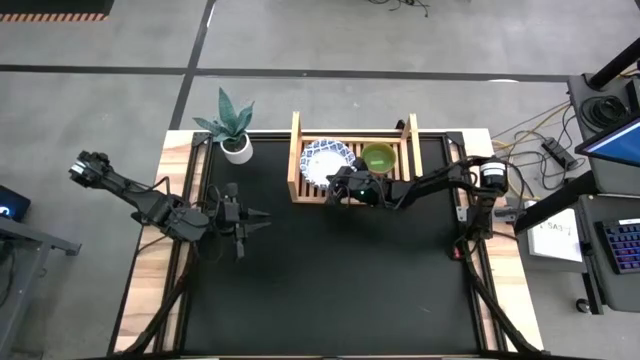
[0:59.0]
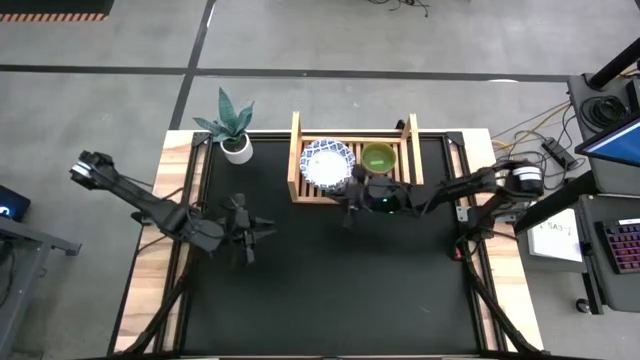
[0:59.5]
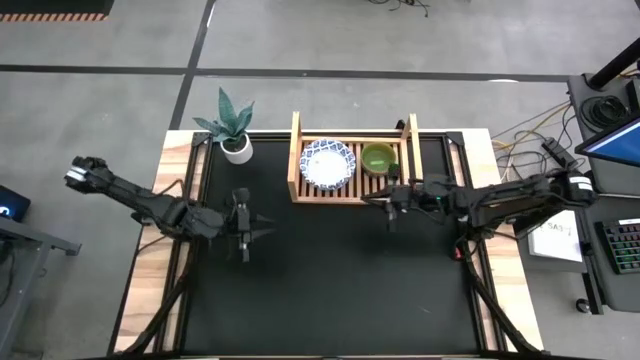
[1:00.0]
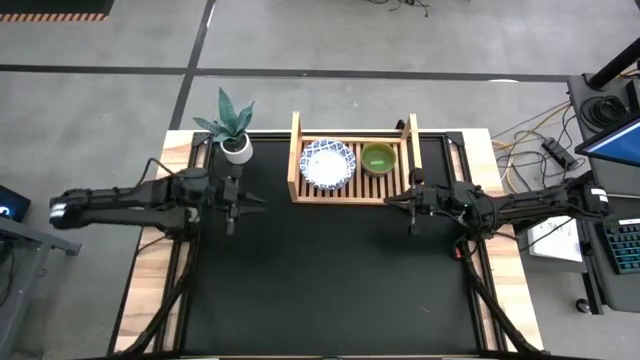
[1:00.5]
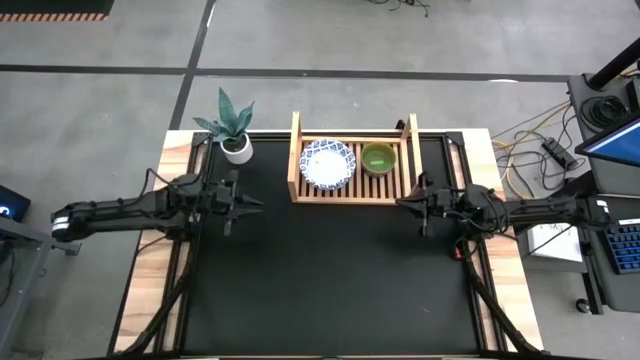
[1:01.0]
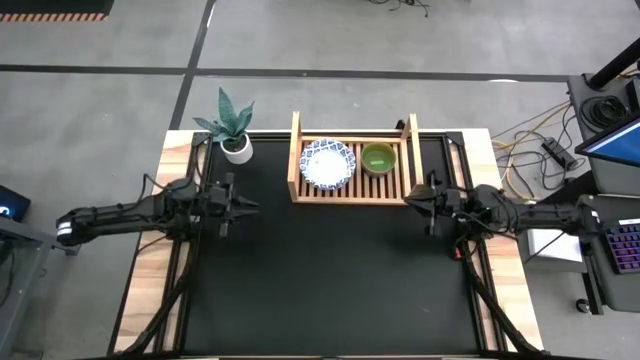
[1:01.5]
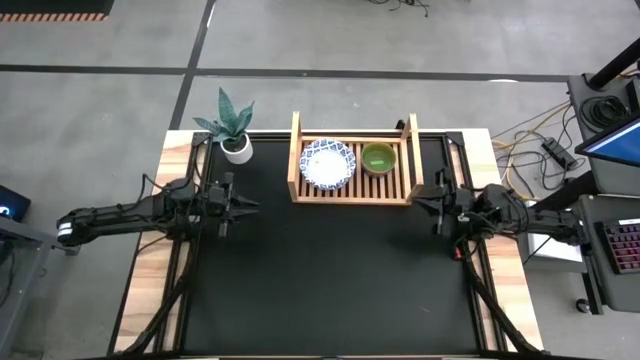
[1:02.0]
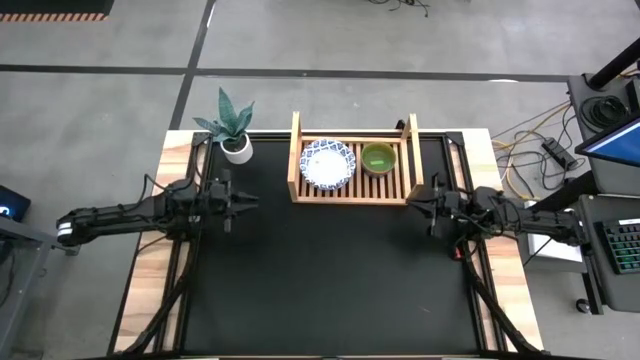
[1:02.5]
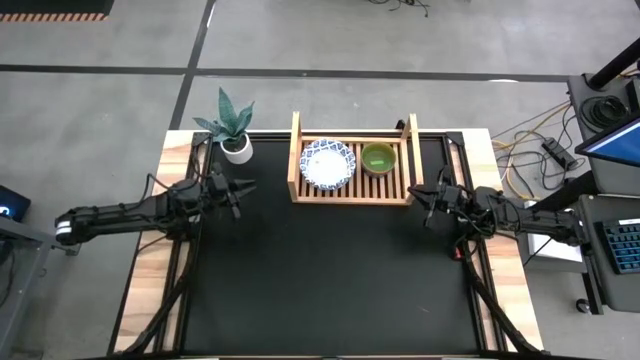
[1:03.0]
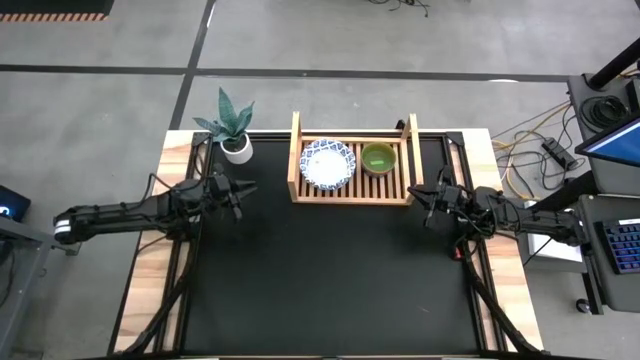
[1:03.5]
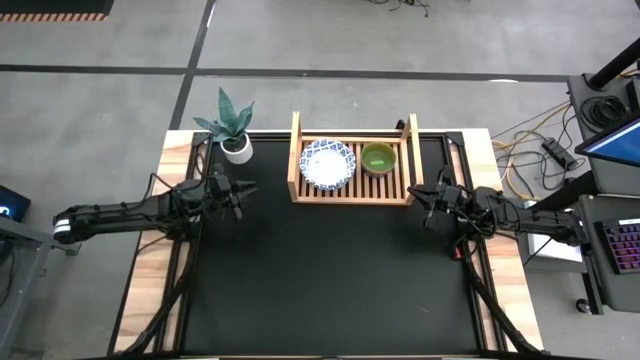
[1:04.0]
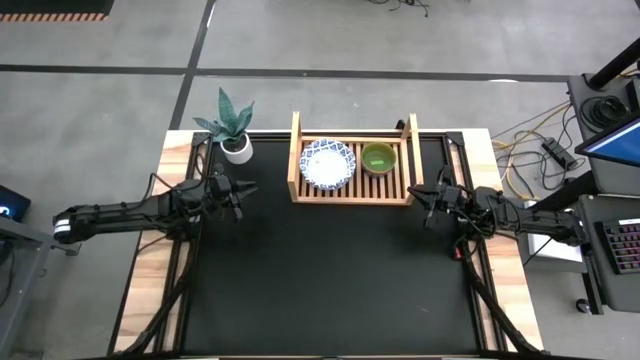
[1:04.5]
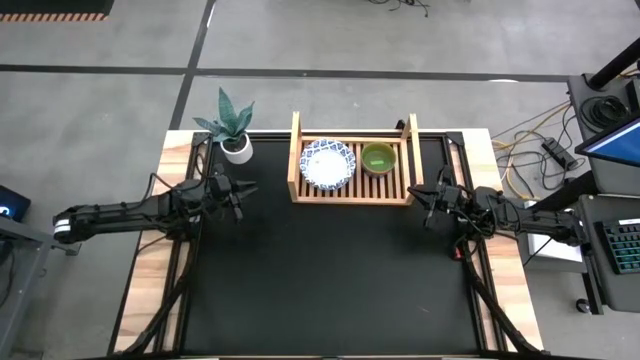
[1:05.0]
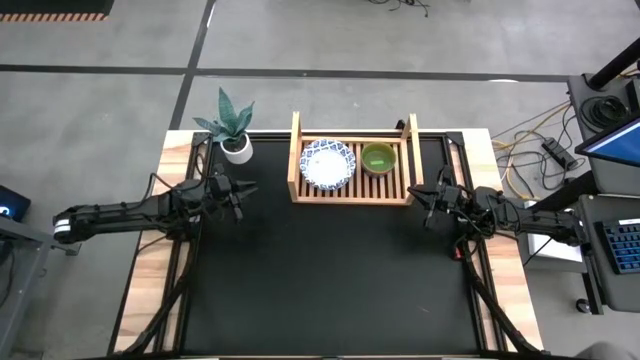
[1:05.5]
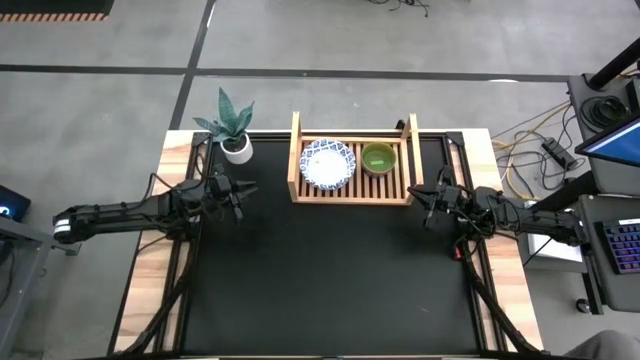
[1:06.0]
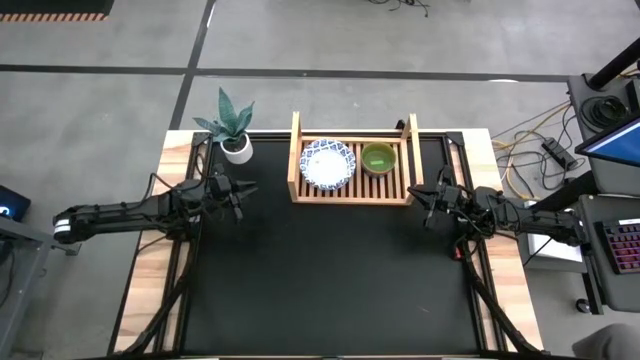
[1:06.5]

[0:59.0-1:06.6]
Task: Place and stack bowls onto a shelf
Return to Home Position

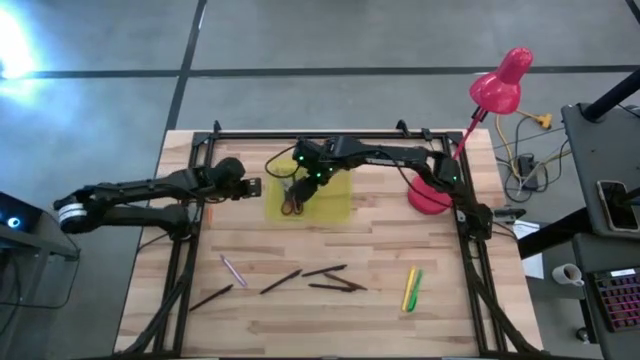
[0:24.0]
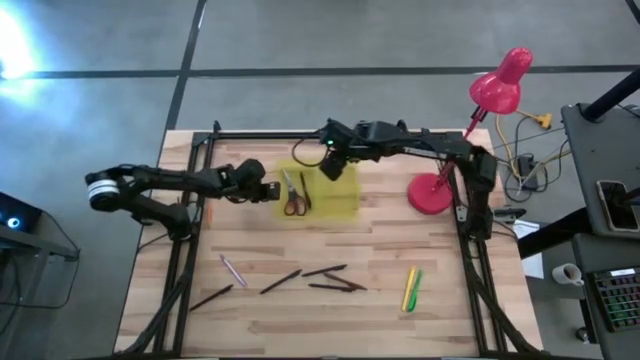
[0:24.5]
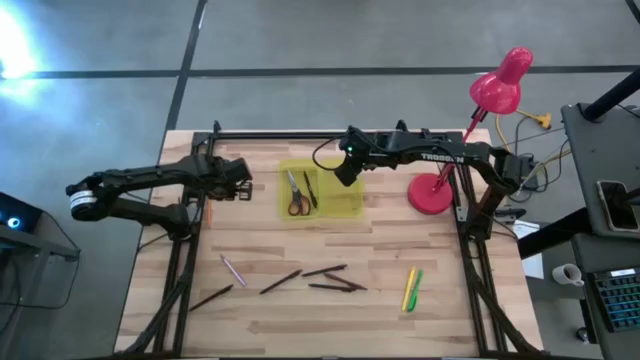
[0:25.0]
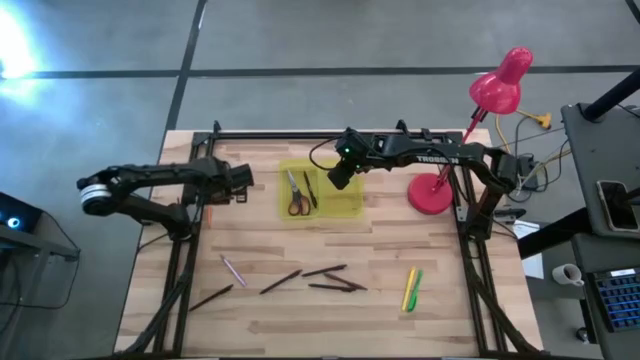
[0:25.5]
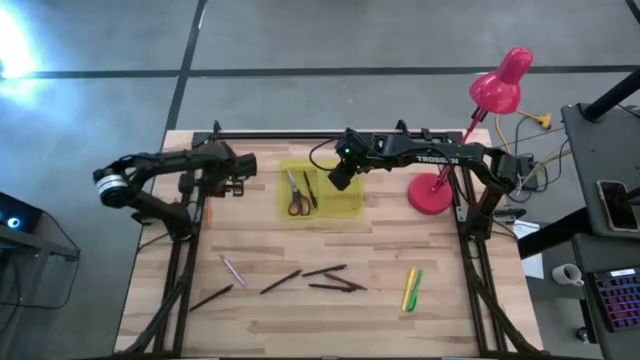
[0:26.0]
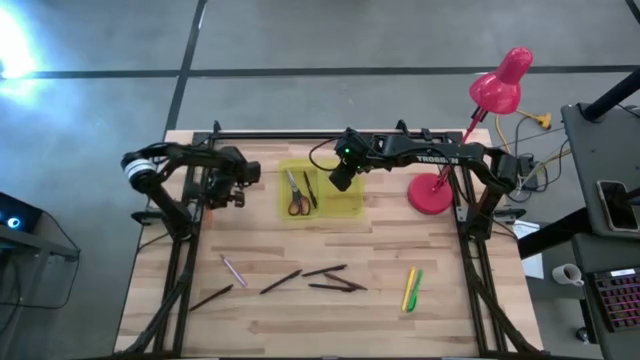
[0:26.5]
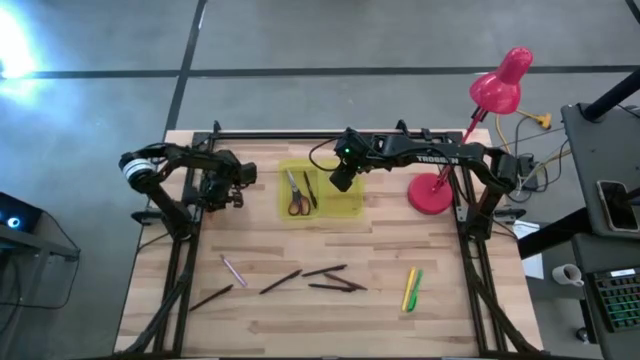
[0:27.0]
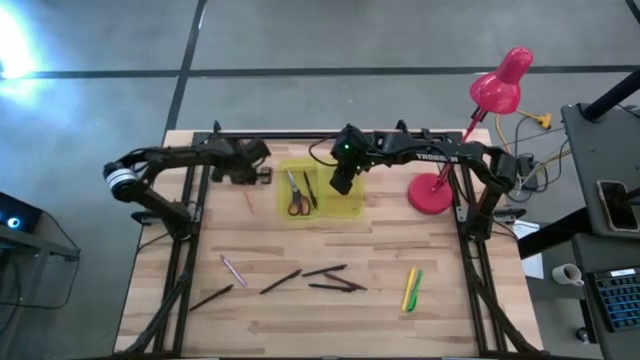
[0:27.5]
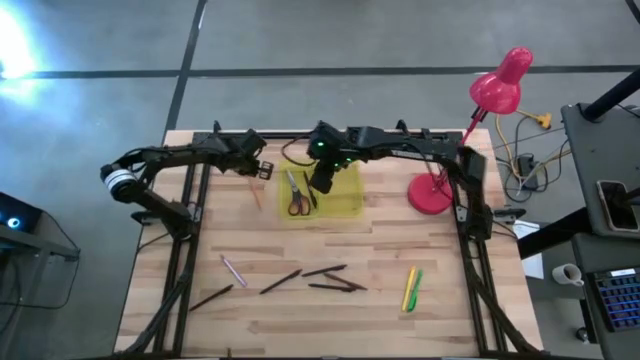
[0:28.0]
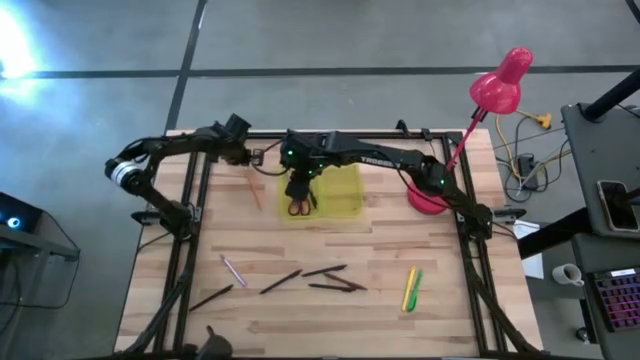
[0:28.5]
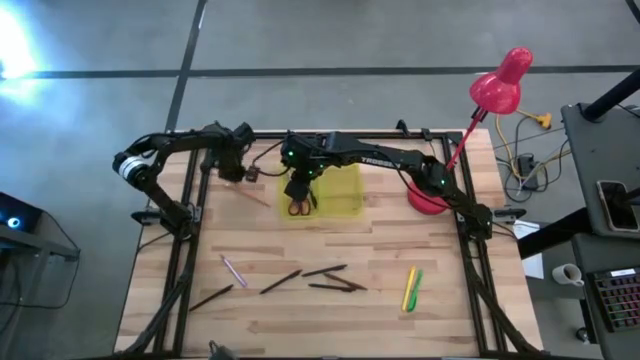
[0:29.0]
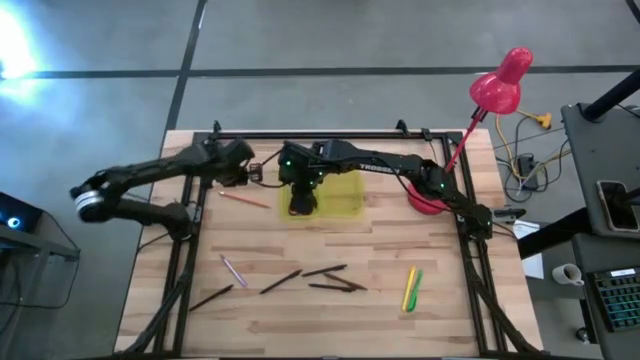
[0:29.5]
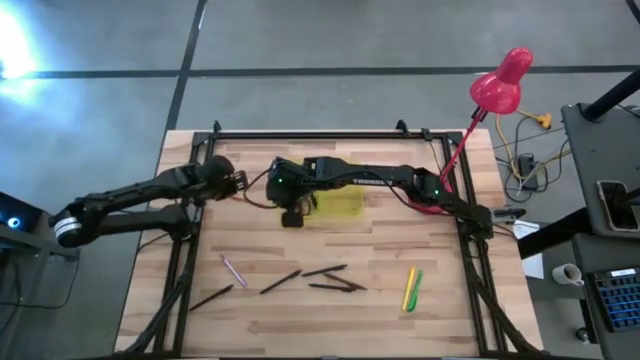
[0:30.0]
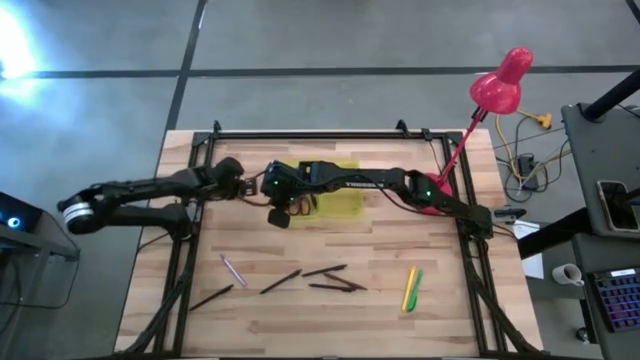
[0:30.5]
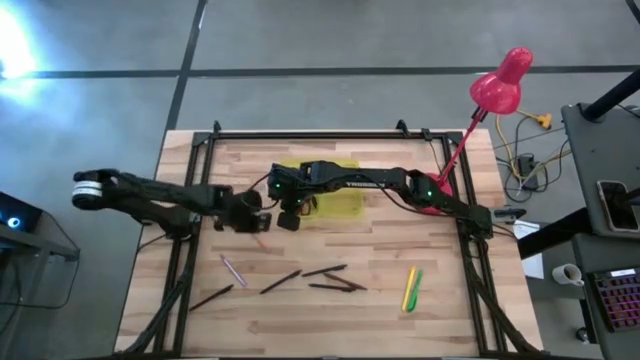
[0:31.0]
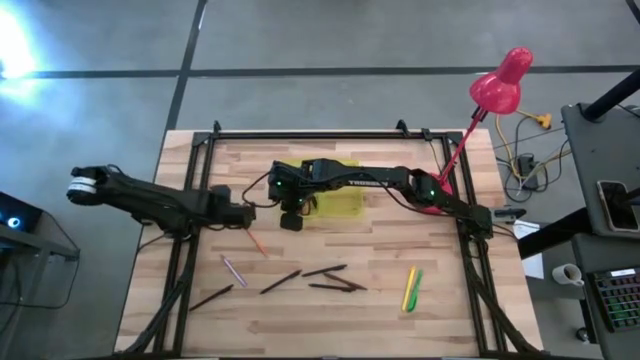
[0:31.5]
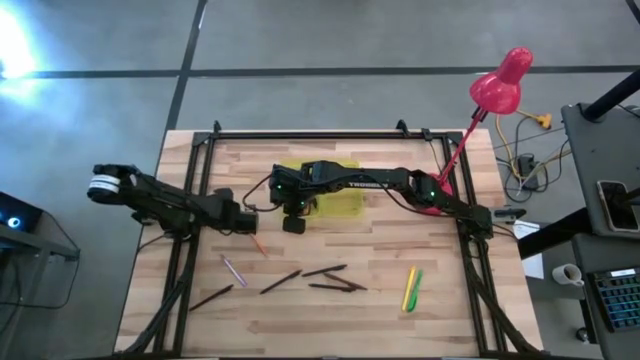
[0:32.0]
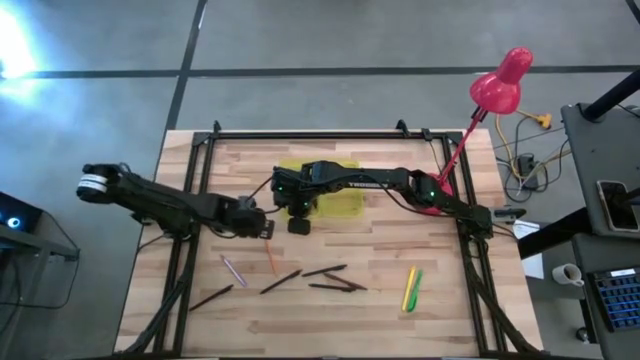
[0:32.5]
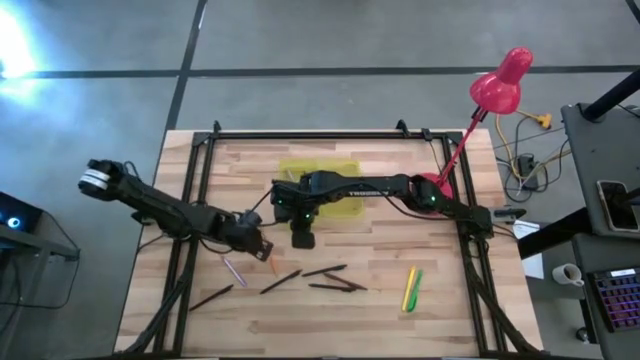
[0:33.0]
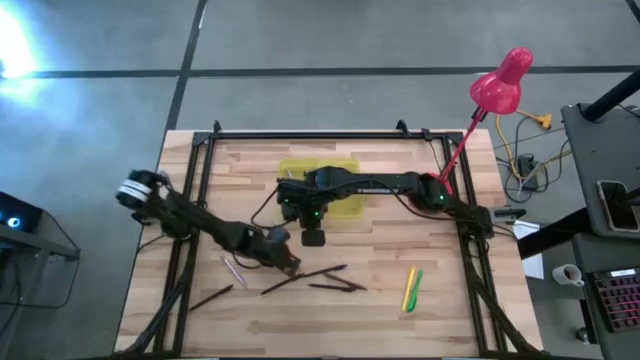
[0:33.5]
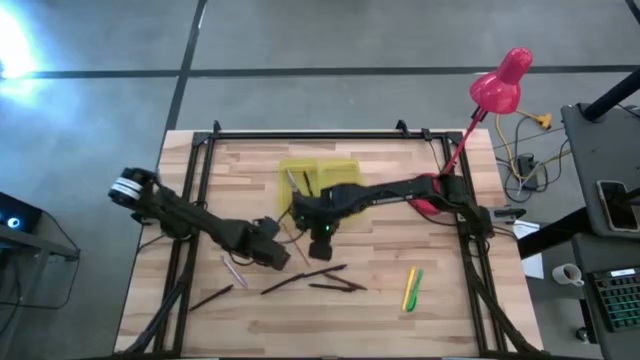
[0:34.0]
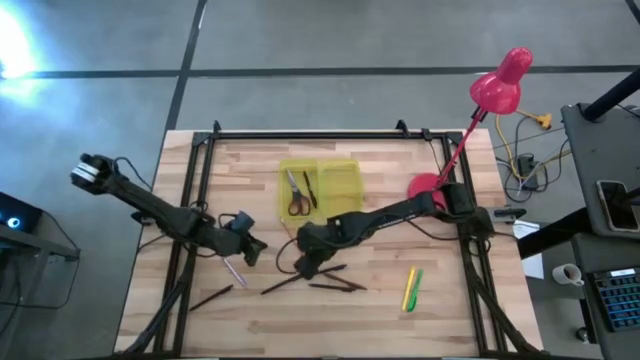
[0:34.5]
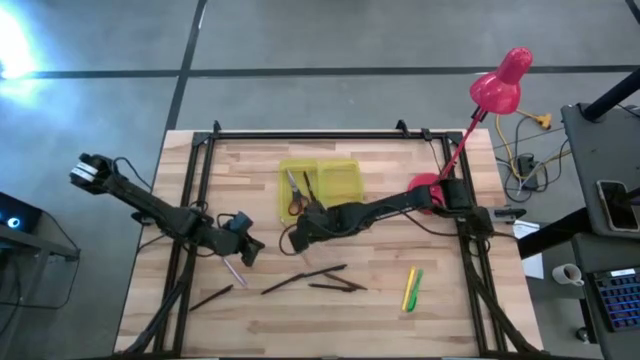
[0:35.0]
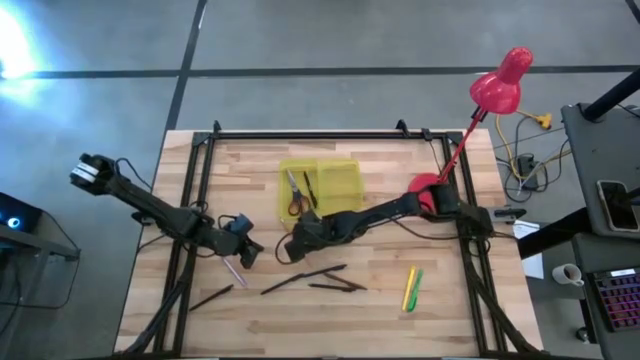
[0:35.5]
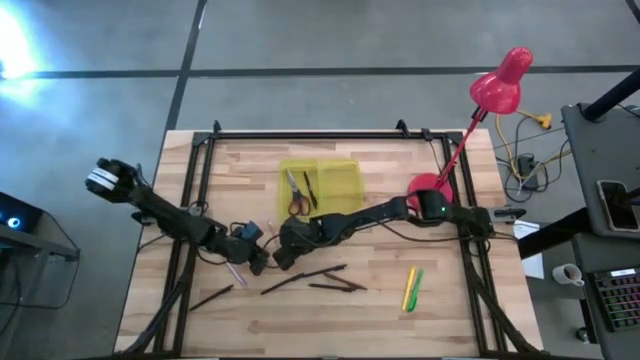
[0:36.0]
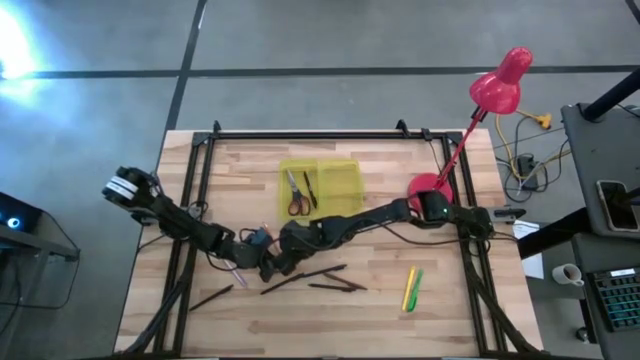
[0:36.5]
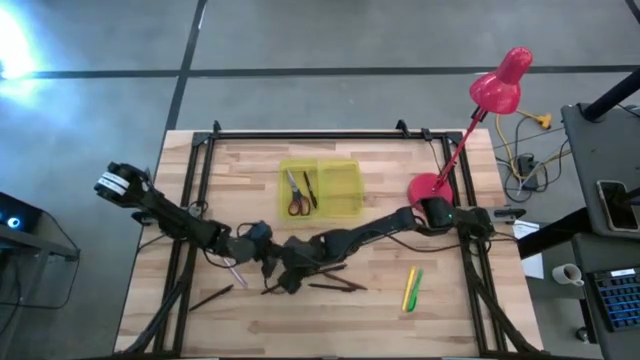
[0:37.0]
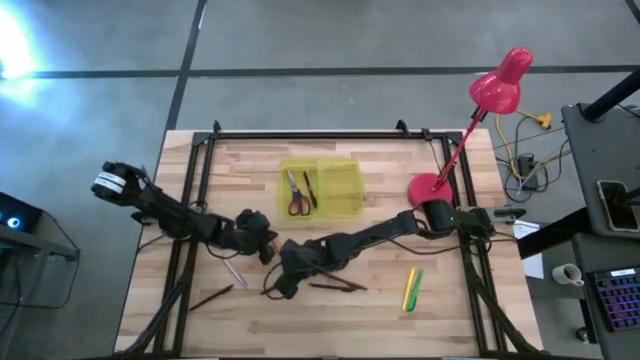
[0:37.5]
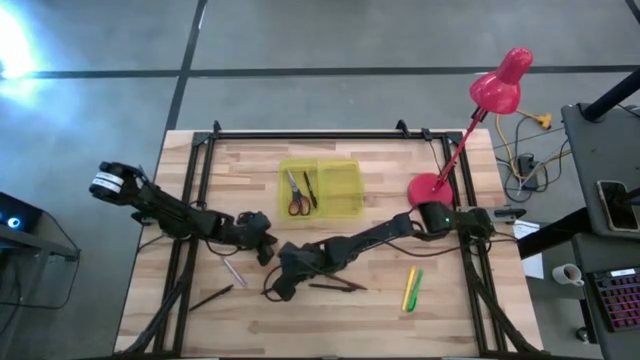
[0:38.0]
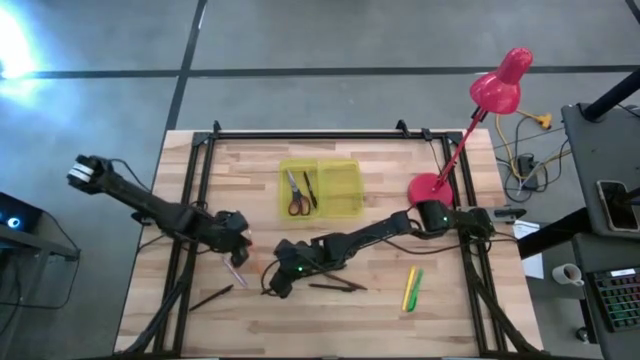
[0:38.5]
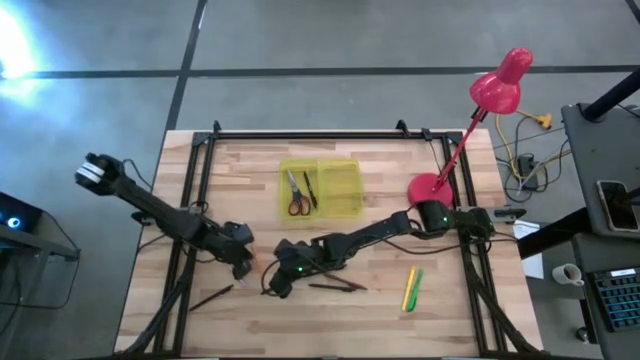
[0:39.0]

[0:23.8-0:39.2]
Task: Pick & place school supplies into a supply box
Put the orange pencil into the supply box
